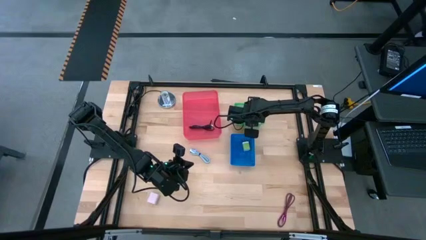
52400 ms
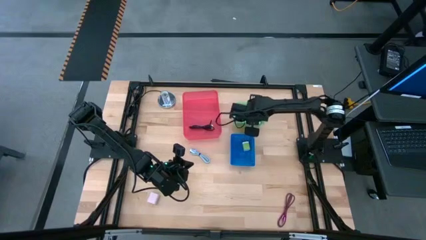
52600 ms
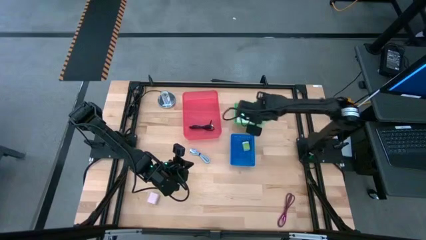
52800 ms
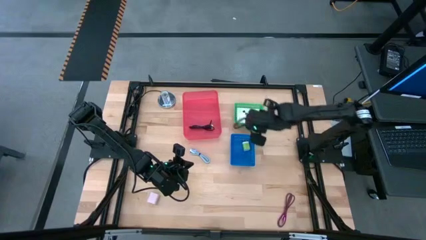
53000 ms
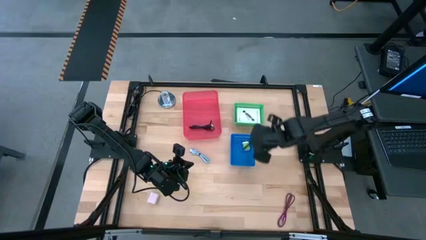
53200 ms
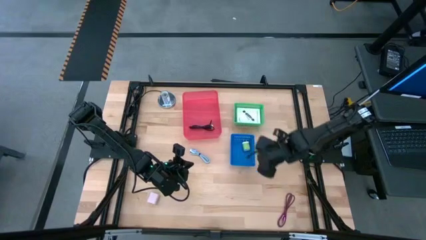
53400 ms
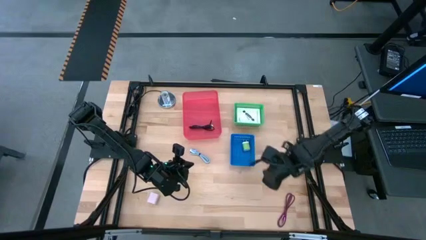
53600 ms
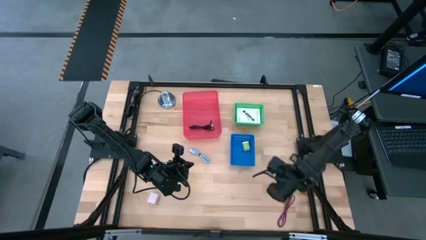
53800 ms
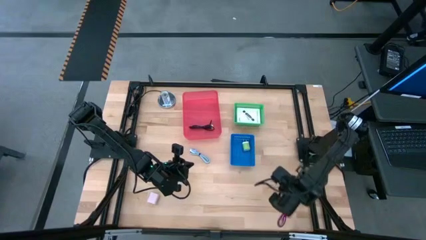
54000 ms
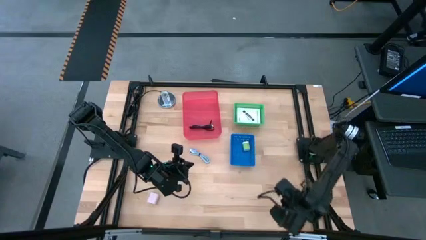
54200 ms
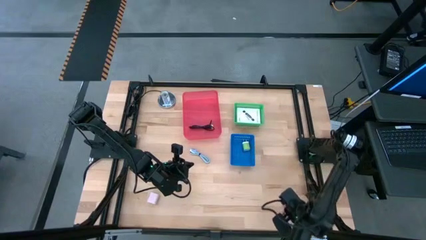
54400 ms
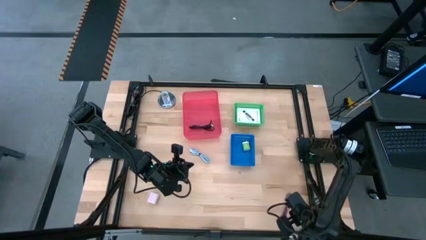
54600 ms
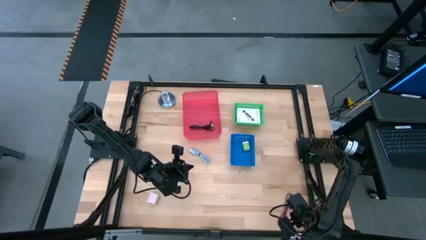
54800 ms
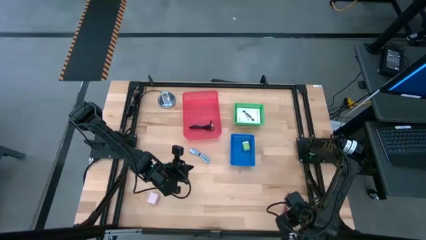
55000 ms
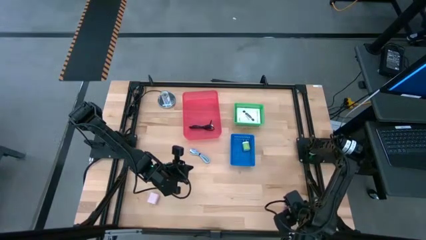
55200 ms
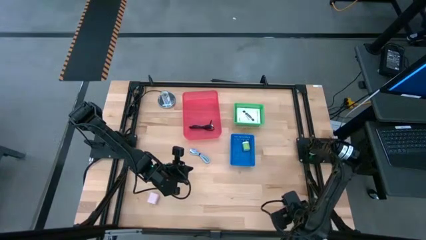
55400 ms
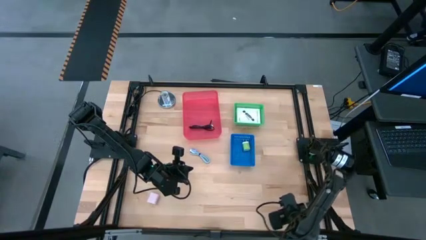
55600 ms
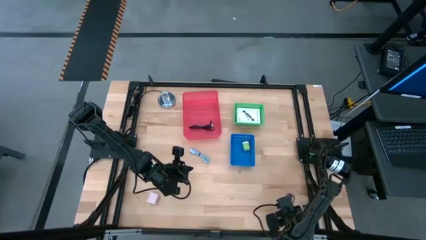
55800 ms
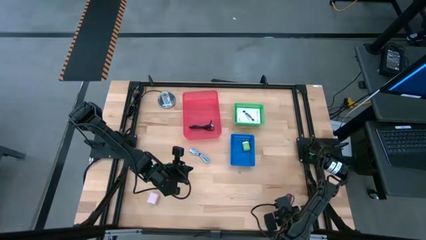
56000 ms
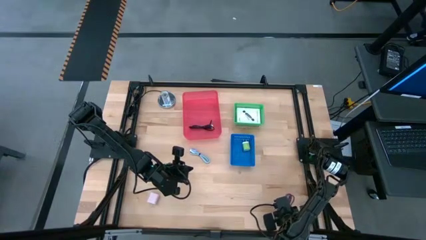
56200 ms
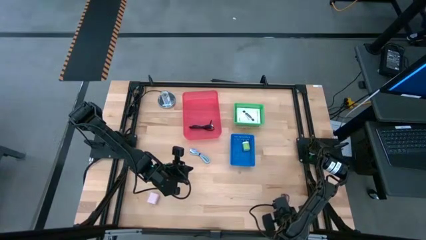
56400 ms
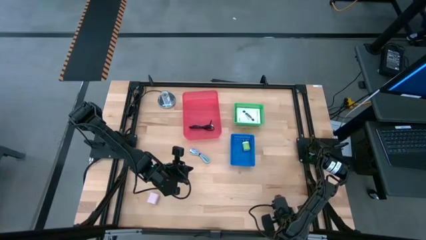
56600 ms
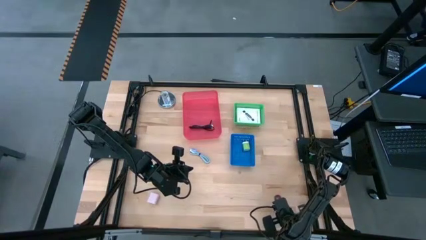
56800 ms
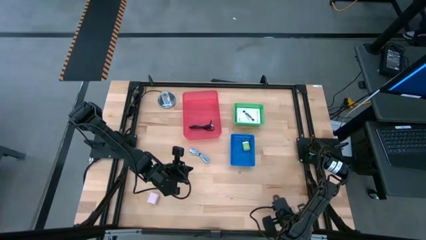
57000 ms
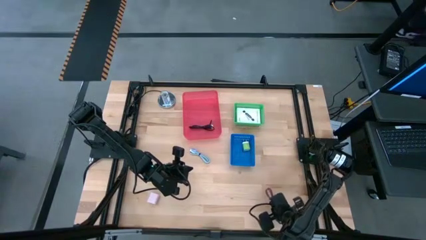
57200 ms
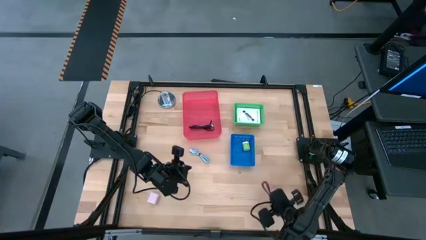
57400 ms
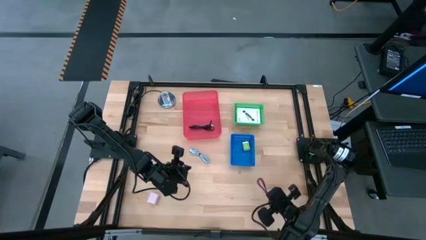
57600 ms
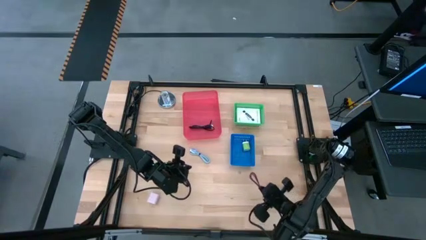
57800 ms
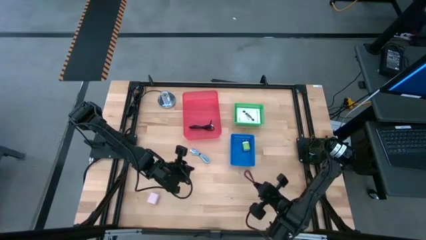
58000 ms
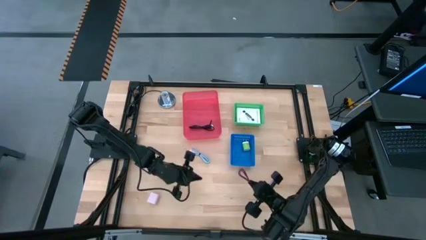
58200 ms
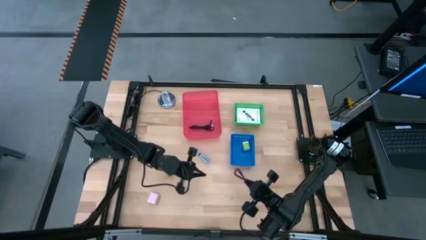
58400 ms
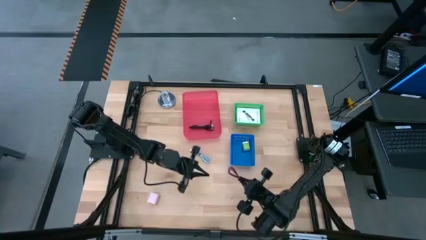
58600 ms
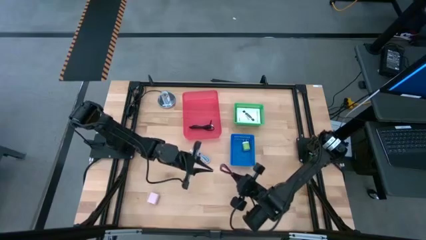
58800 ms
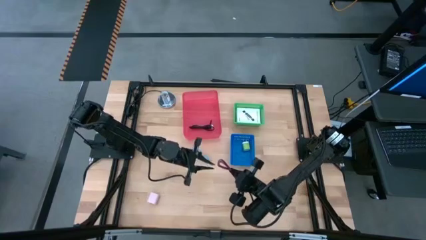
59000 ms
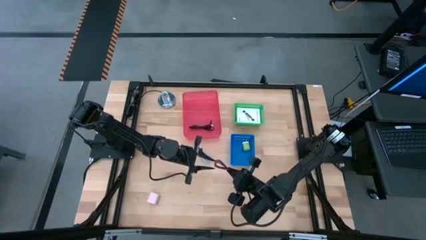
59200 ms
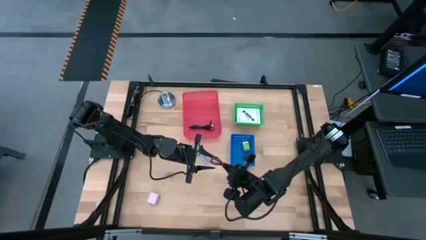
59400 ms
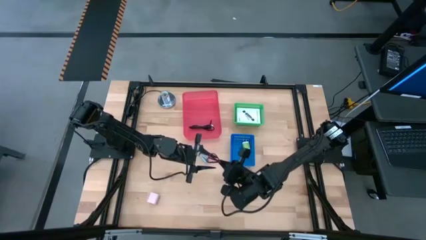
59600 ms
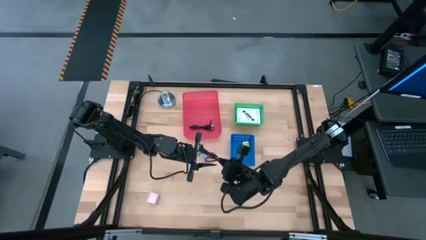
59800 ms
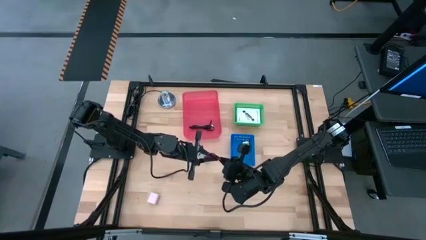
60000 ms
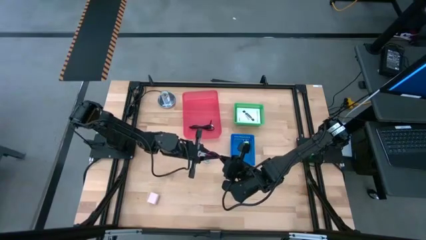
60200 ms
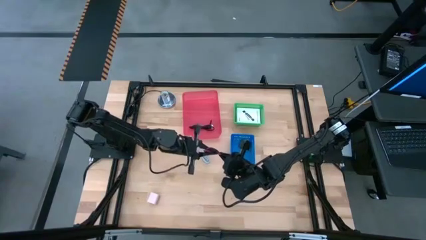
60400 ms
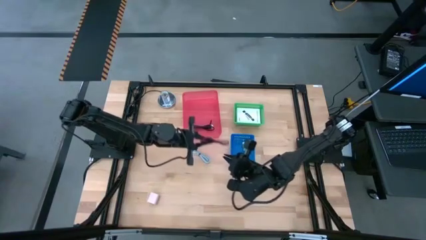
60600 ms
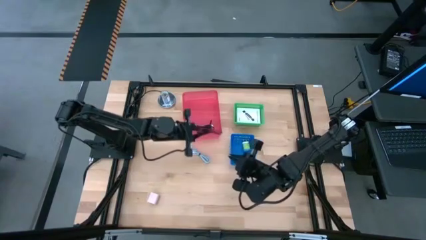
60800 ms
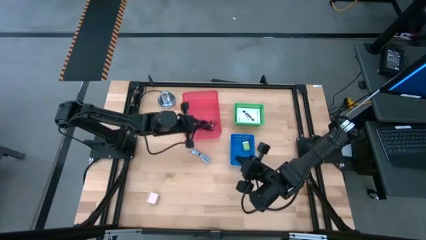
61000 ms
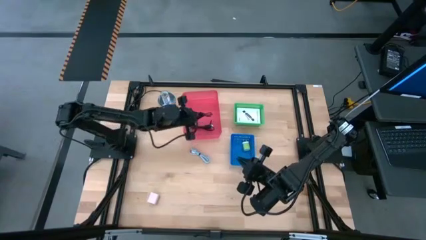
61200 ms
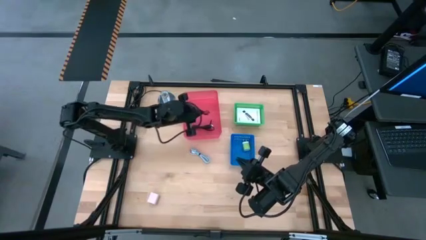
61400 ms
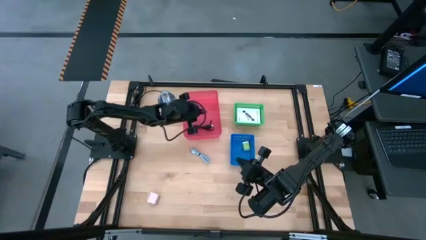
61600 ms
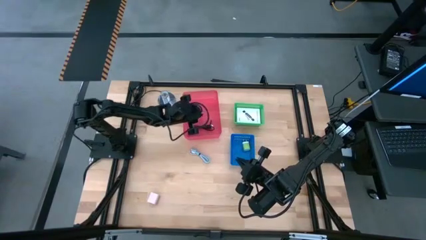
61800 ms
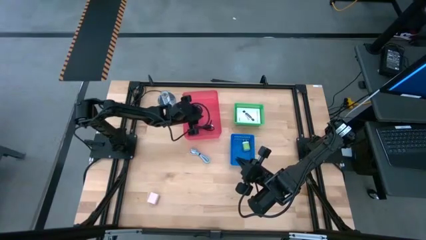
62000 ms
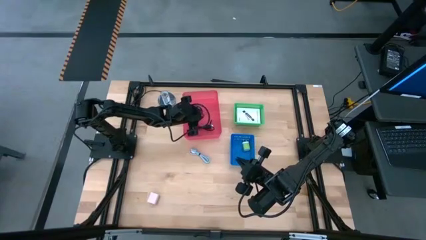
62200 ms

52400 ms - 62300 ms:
Task: Pick and place items into bin
Put the pink charger cable into the pink bin

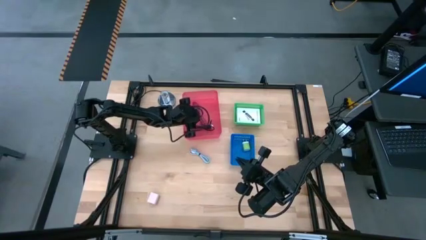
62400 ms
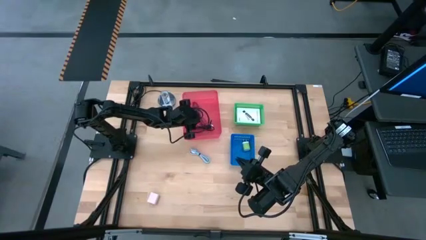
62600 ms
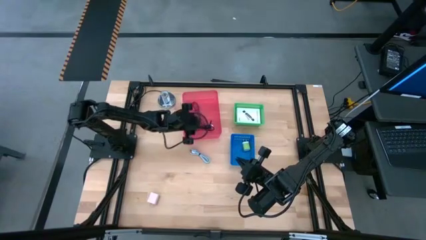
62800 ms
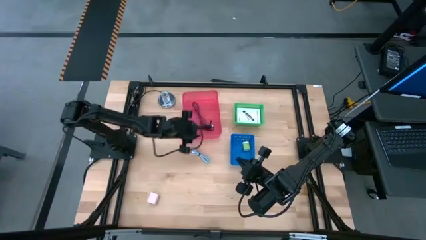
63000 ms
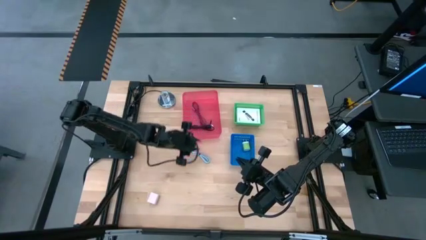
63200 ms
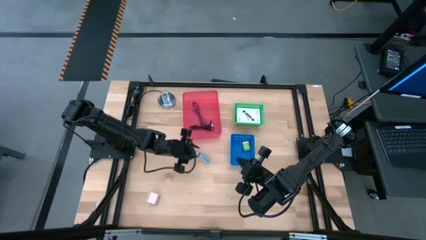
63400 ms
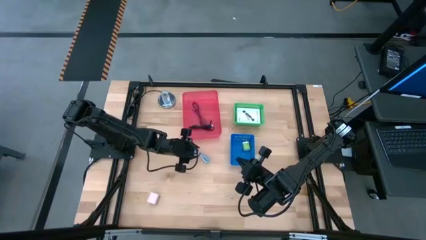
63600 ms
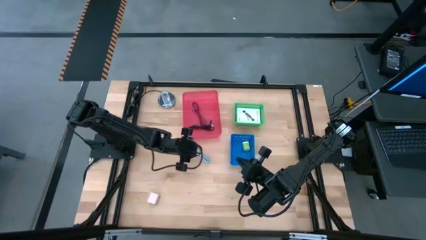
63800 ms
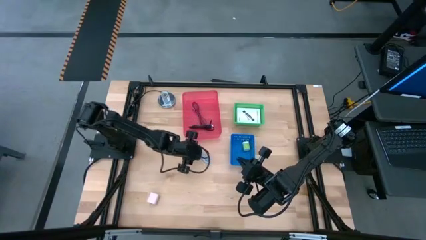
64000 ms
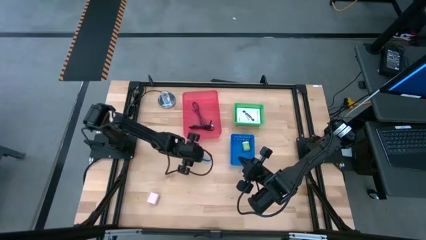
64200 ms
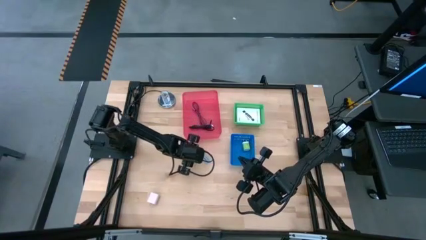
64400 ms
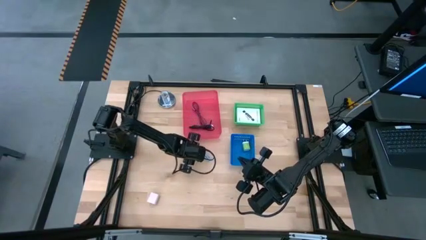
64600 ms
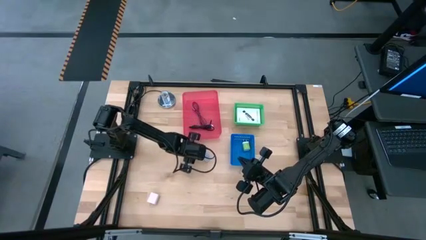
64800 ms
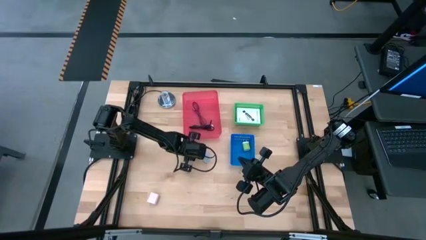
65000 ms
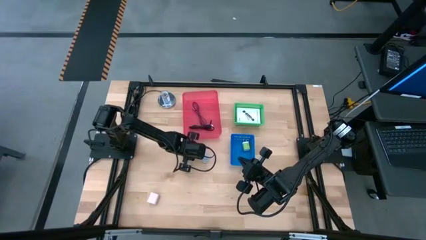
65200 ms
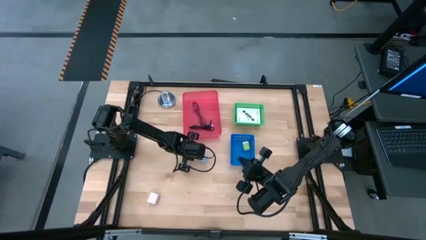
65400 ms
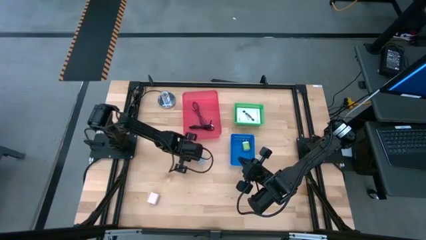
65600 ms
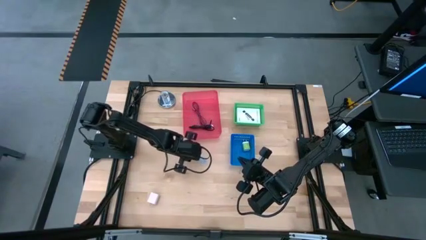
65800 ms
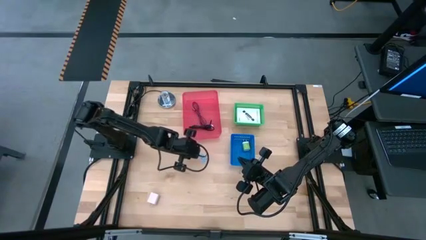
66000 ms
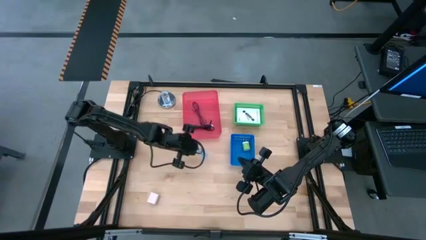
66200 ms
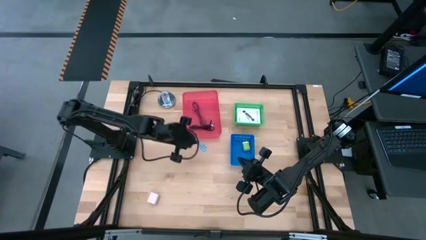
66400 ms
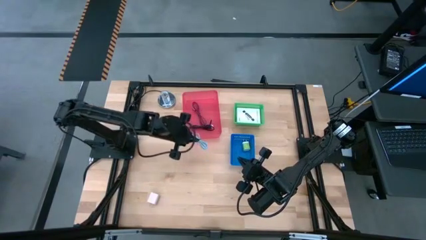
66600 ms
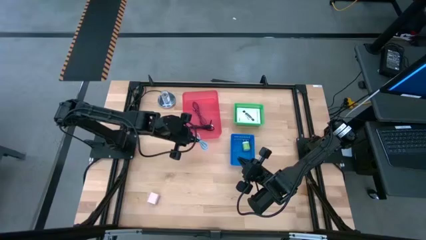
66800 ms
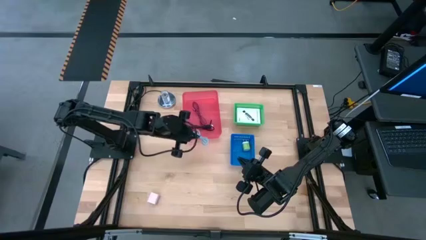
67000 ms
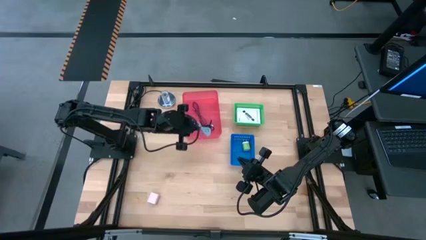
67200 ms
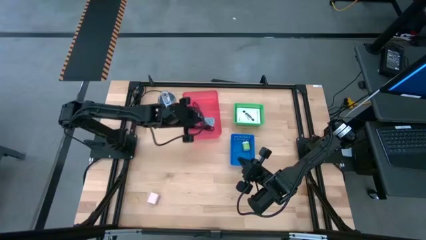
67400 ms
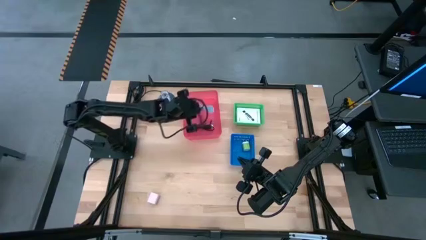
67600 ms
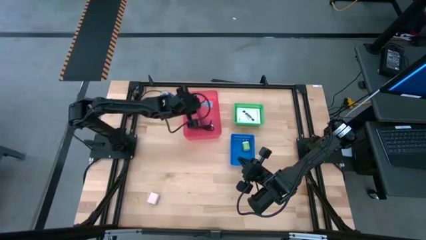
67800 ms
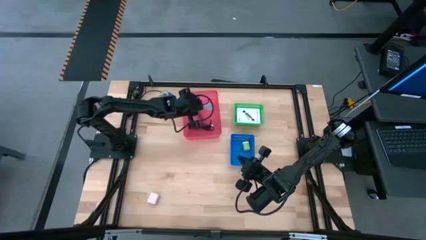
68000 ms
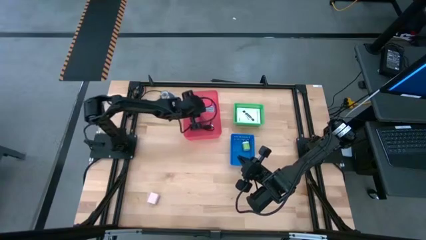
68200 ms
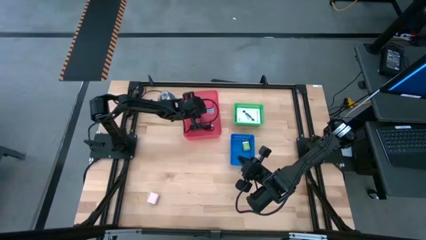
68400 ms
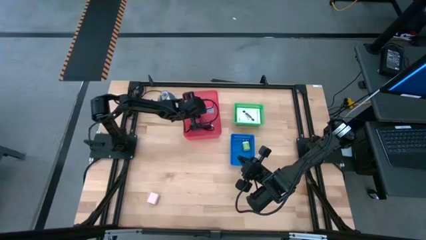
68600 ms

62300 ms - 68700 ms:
Put the light blue charger cable into the pink bin
